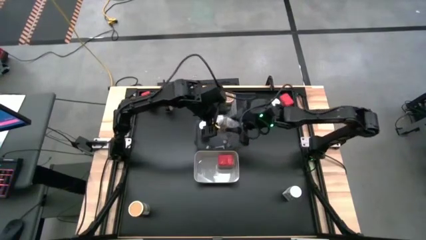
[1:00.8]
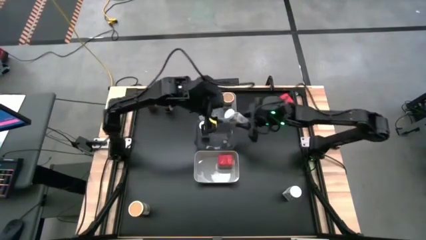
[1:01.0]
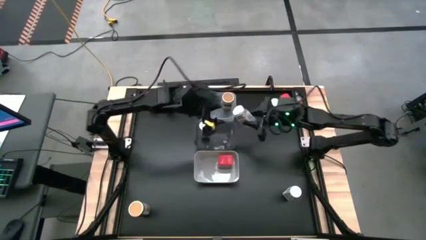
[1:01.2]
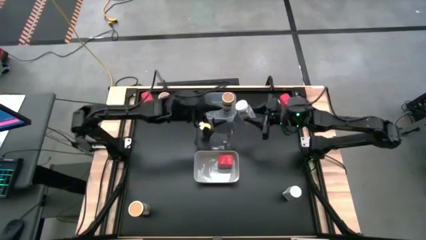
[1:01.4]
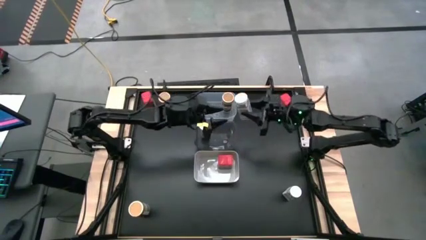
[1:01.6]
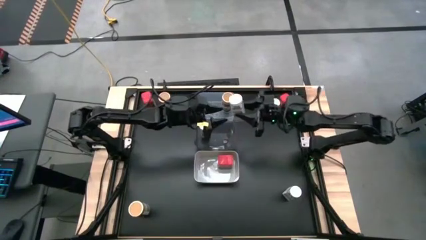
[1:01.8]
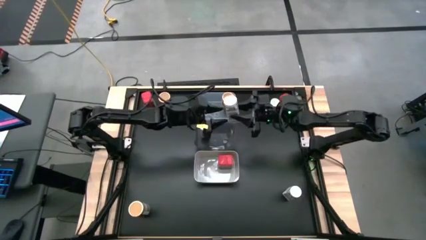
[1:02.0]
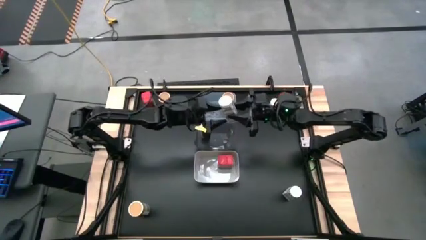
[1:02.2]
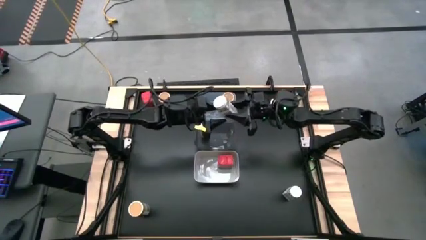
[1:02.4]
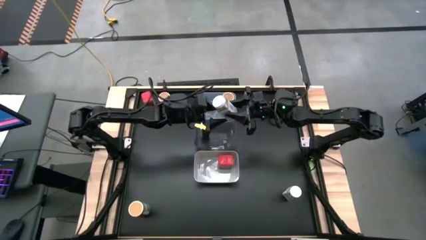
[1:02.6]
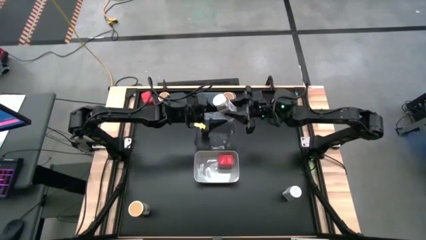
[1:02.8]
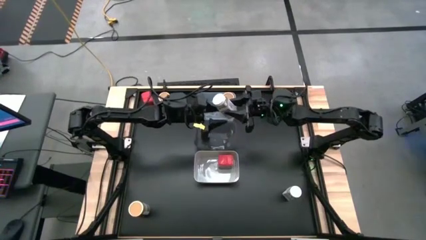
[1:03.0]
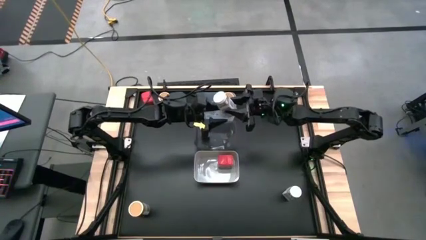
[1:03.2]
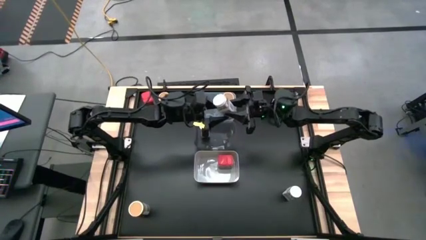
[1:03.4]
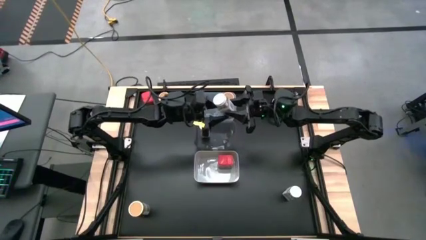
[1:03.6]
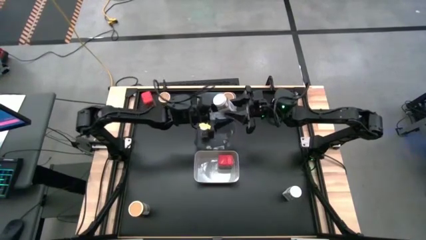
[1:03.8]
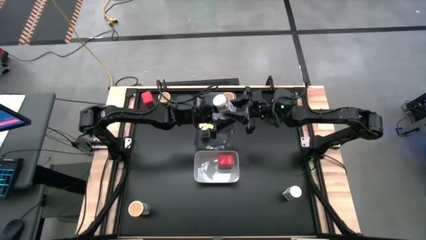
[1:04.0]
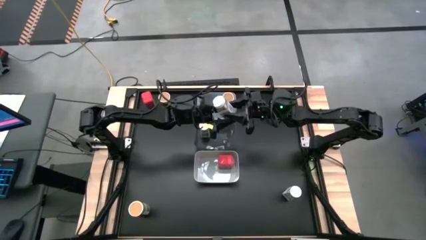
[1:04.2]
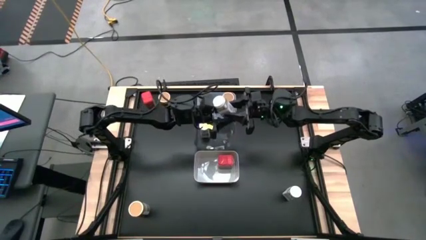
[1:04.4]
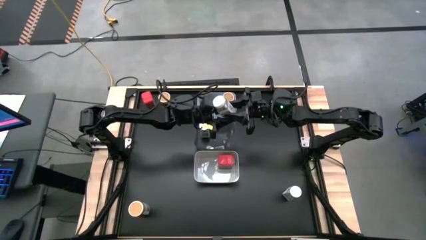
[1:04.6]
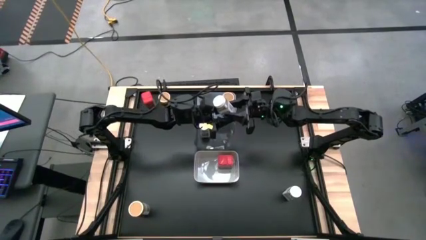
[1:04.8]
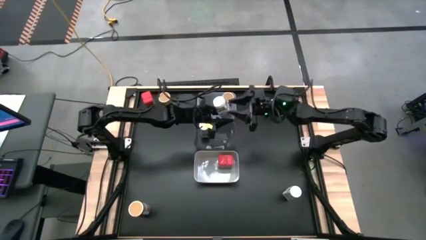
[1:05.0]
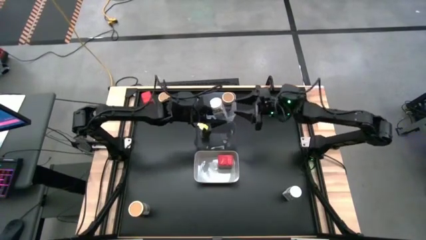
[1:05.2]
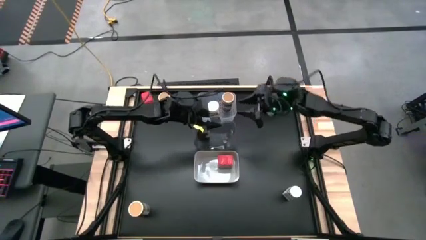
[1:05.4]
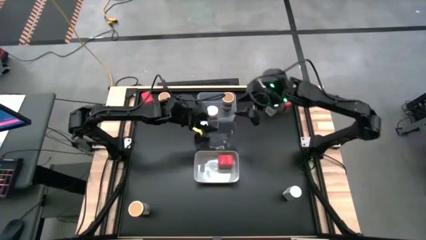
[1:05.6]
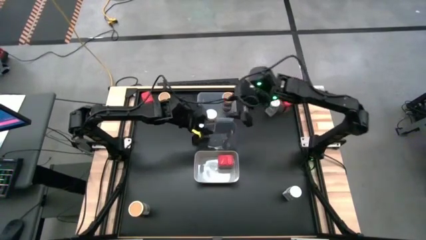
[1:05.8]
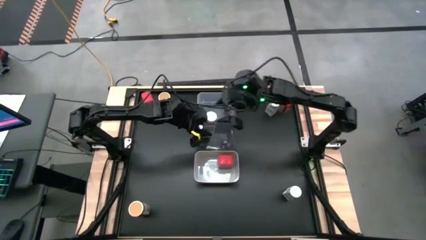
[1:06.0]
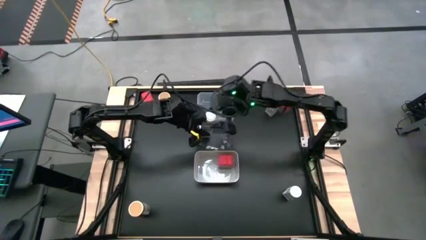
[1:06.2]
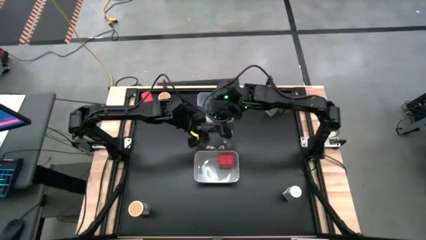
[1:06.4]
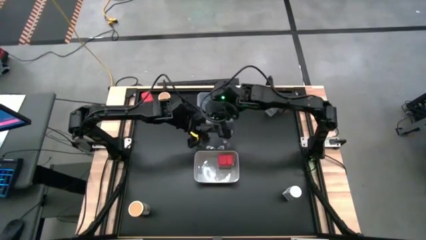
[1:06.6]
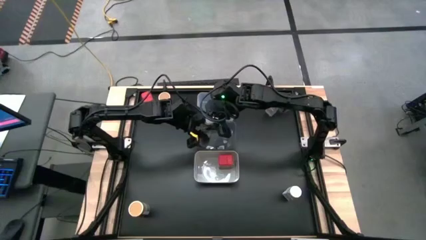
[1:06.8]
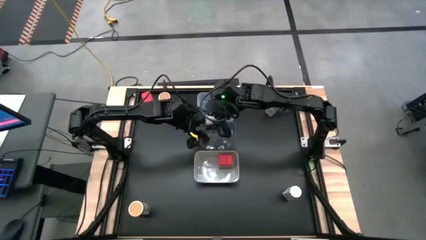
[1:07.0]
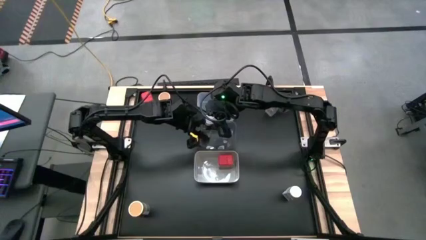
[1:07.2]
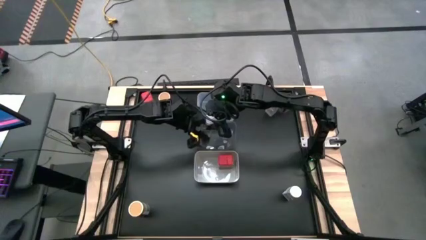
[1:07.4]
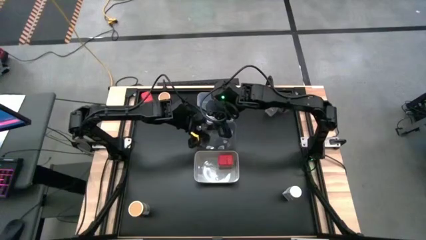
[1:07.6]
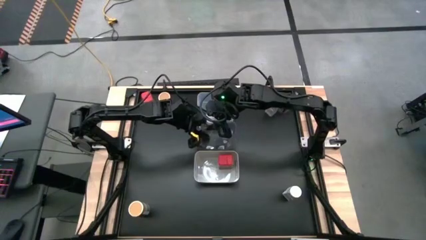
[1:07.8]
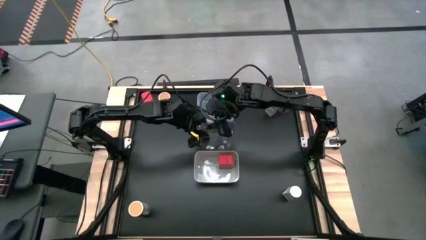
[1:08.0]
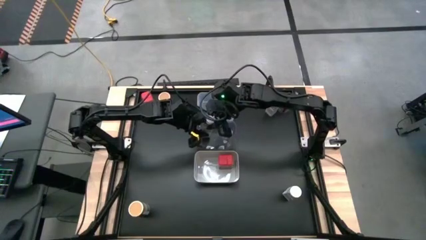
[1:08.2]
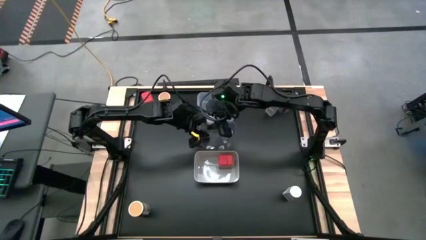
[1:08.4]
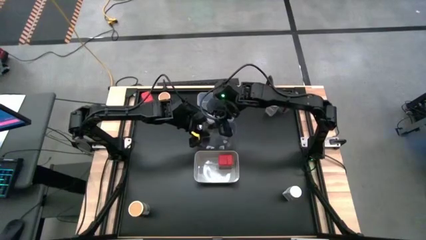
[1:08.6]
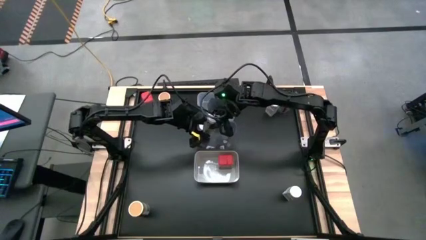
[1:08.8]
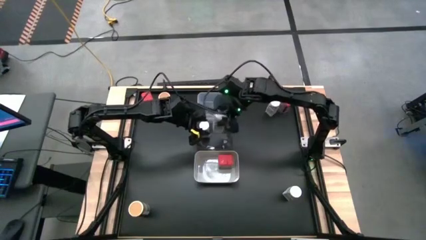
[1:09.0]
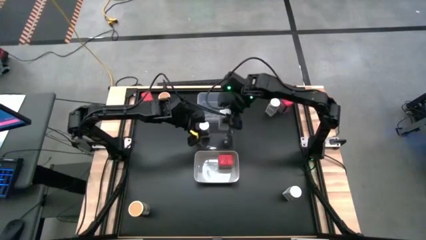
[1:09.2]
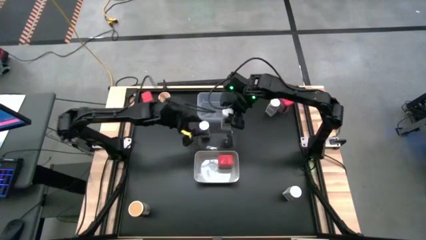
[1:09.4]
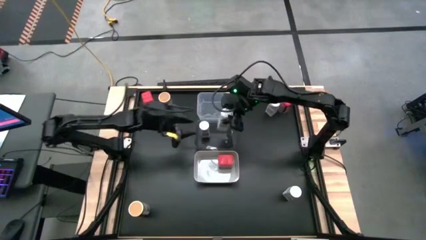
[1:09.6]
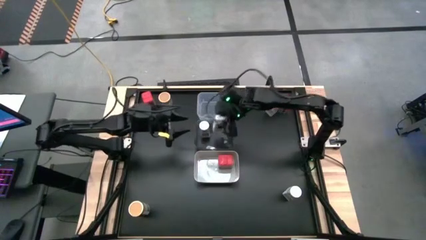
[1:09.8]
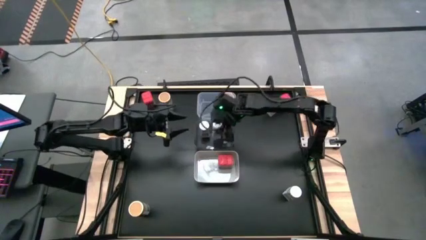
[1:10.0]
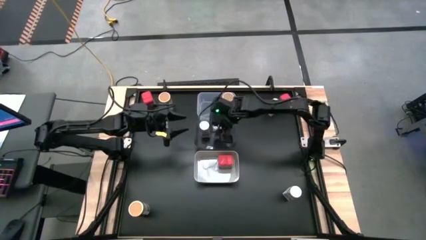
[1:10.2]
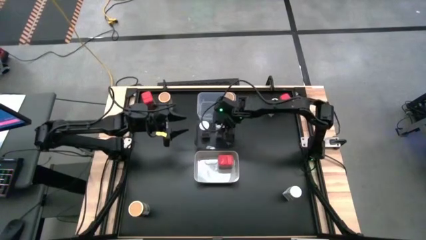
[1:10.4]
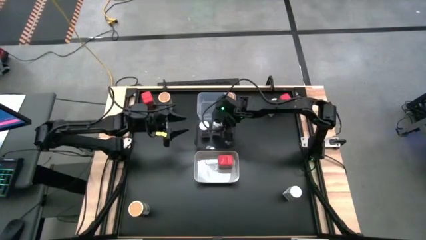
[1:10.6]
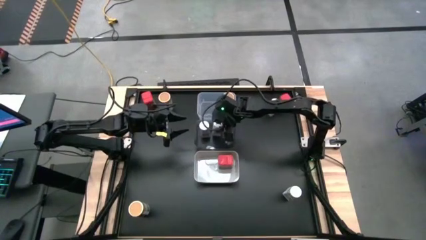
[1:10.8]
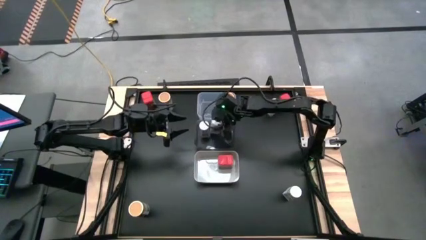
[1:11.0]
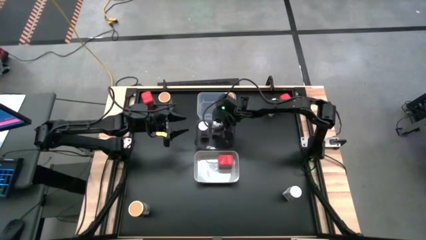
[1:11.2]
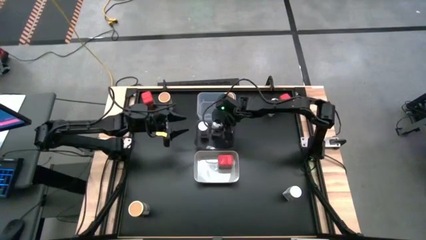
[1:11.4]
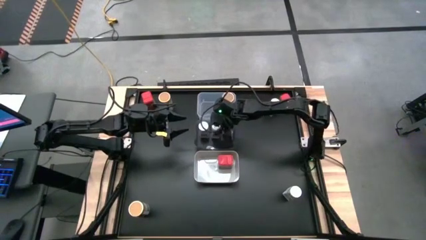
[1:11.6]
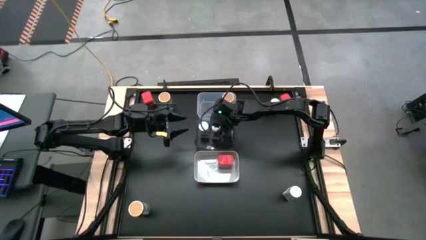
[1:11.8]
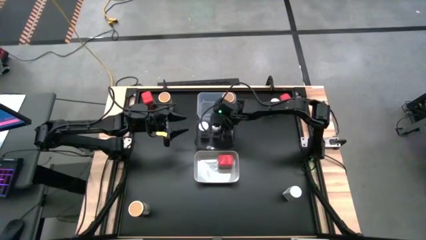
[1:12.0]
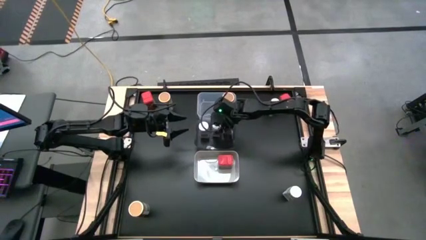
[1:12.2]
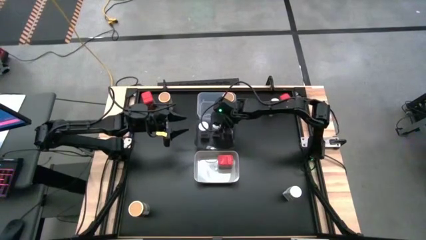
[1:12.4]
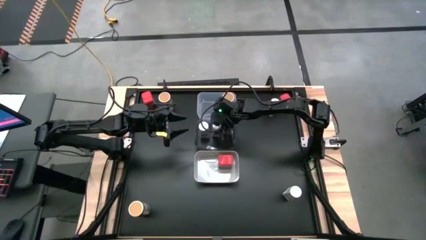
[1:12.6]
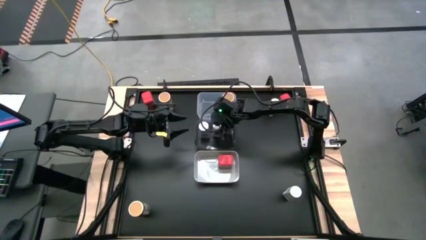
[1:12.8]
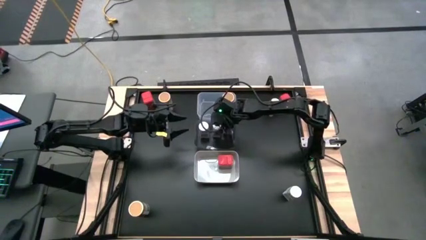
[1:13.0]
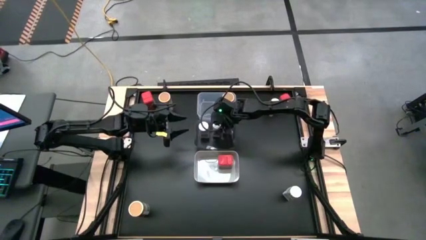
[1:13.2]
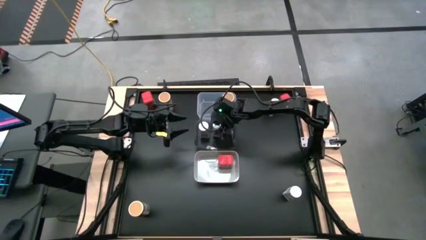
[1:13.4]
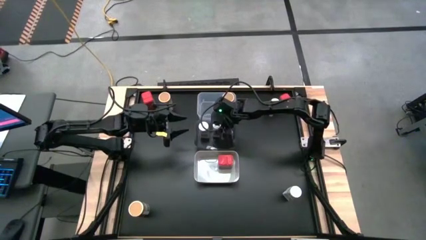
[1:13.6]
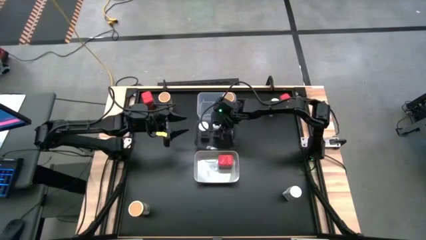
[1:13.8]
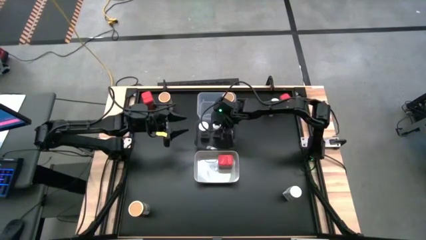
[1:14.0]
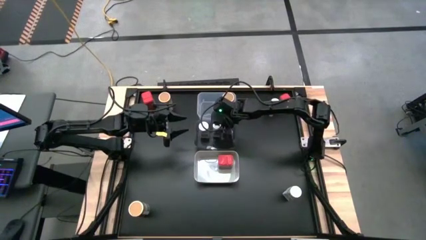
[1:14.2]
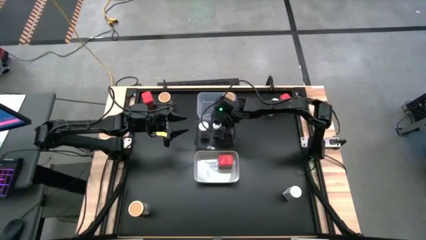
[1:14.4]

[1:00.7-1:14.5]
Task: Sort spices by type
Put the top left white seasoning bottle into the black transparent bin aligned with the other white seasoning bottle
